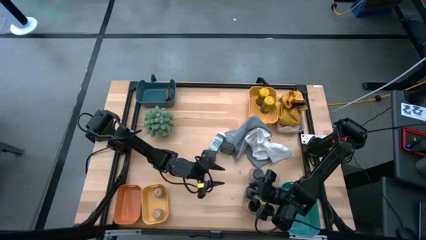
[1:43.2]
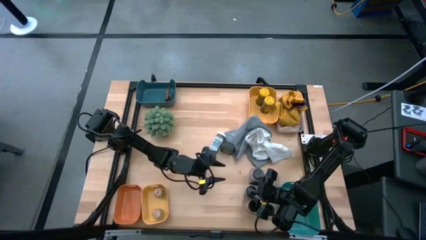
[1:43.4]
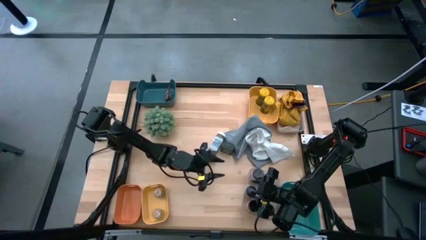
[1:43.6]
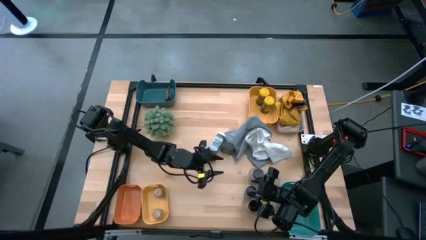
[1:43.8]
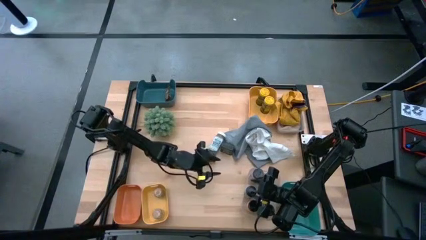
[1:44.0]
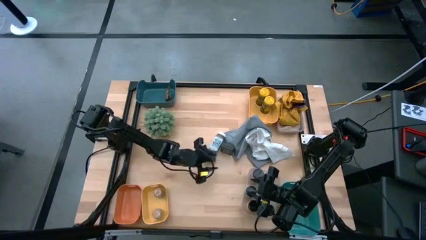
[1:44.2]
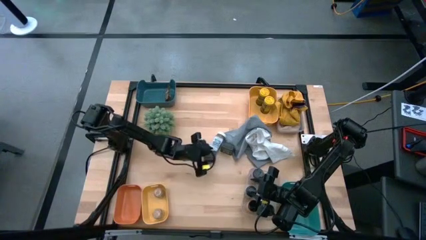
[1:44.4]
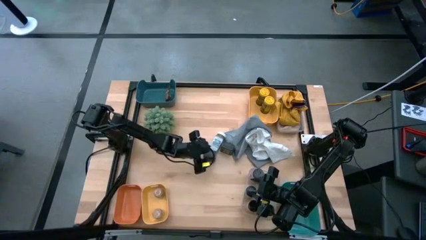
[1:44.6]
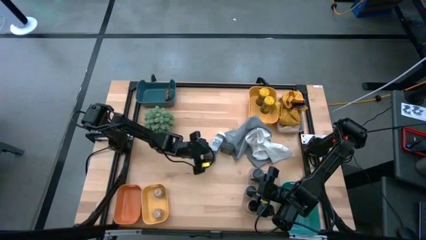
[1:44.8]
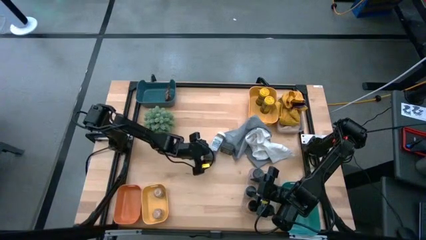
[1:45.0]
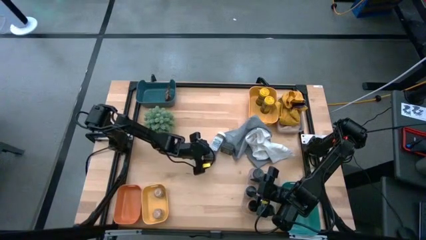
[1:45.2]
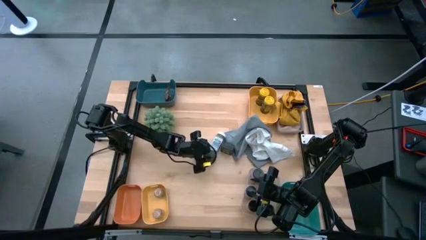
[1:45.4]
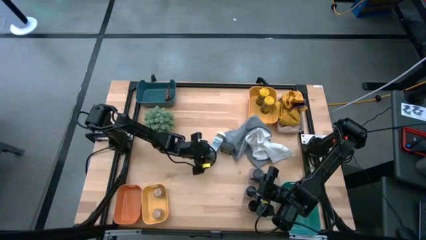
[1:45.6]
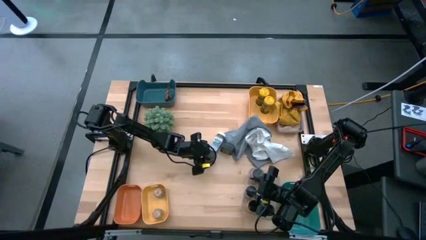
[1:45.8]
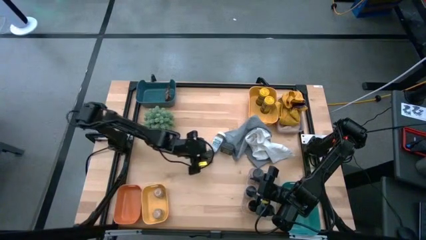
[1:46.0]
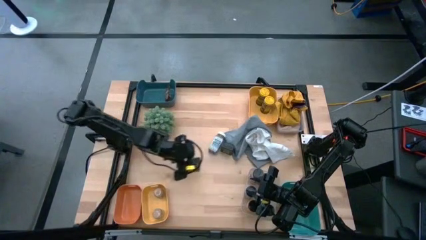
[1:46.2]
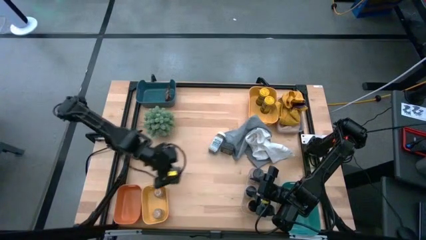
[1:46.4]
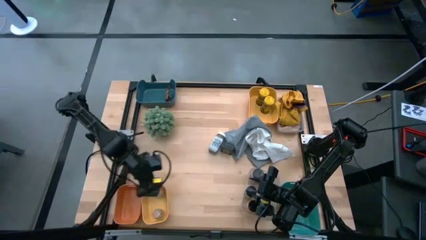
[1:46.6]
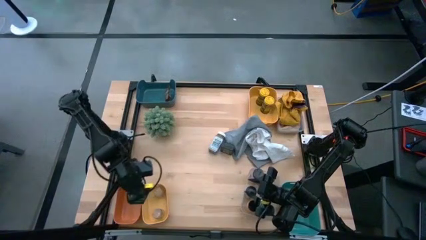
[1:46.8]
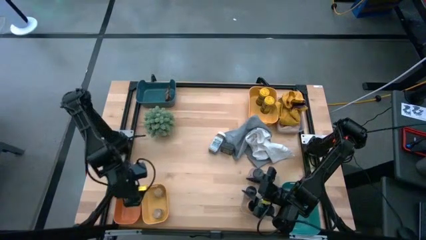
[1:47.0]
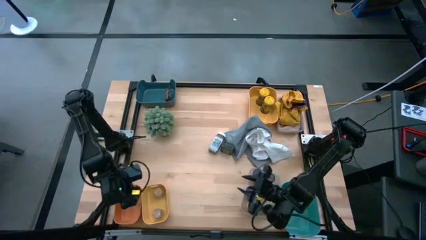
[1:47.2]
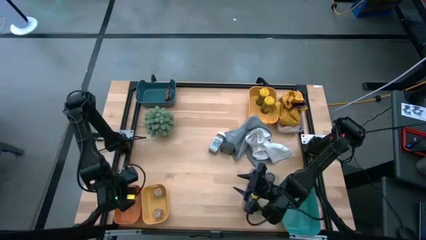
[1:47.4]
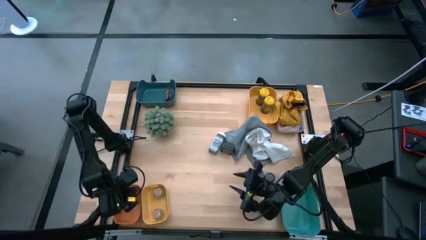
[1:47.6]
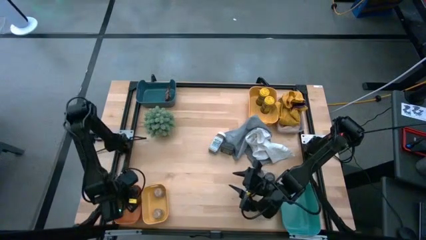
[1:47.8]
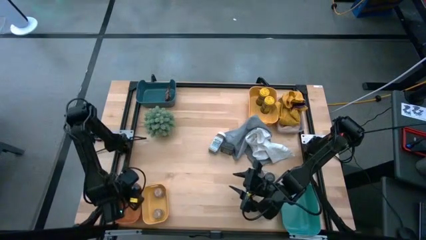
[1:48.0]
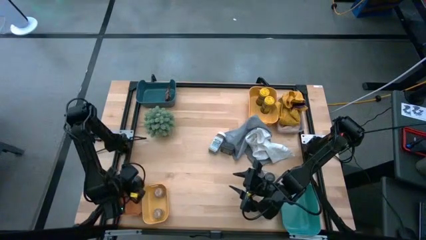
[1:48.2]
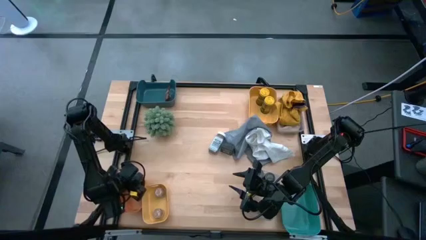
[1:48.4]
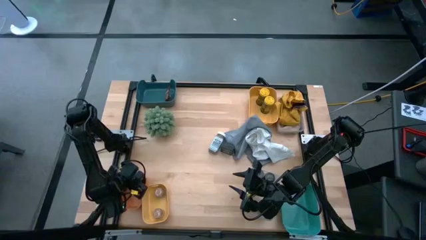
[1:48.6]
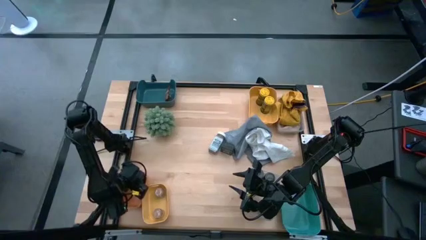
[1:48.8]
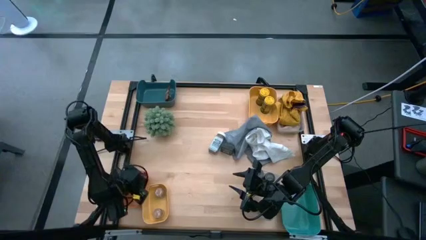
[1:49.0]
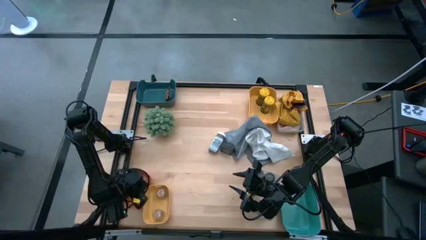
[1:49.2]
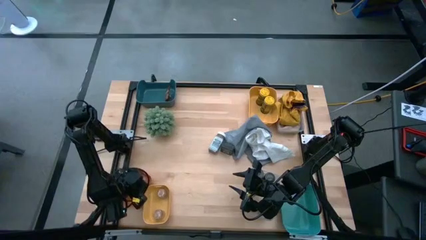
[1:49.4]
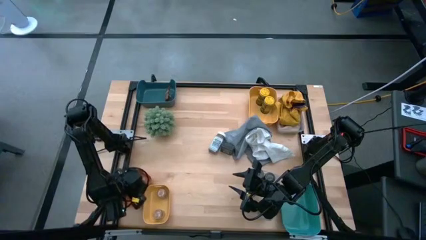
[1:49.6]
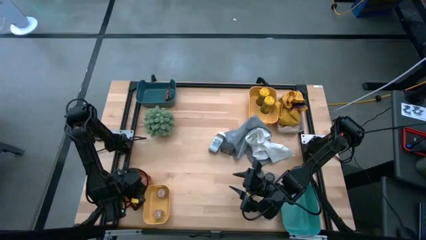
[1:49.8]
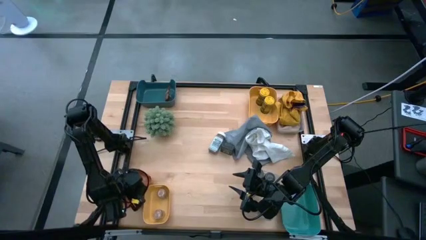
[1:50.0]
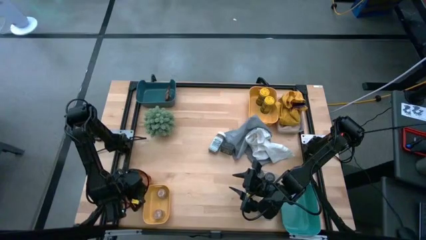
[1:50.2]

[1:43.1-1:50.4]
Task: Sort spices by type
Put the black seasoning can into the orange bin

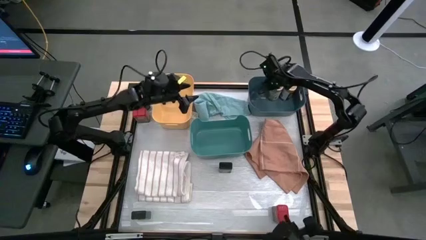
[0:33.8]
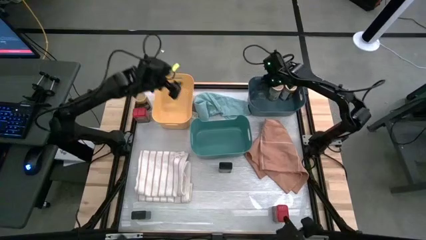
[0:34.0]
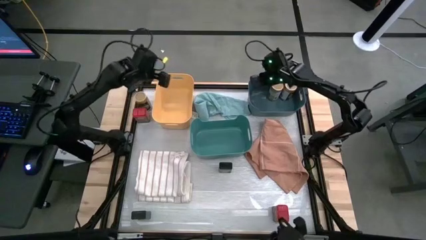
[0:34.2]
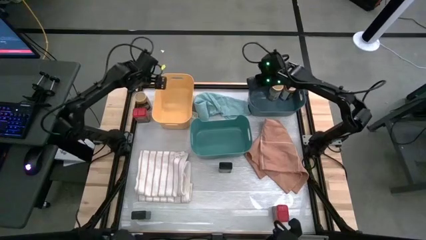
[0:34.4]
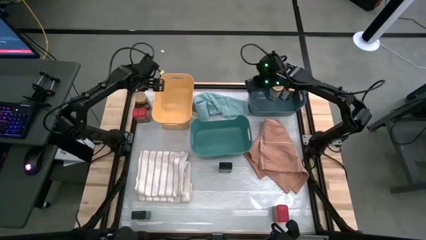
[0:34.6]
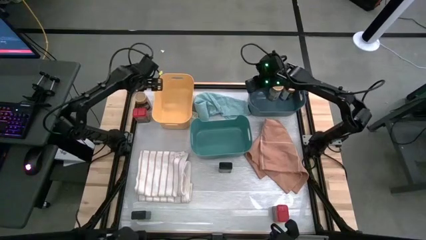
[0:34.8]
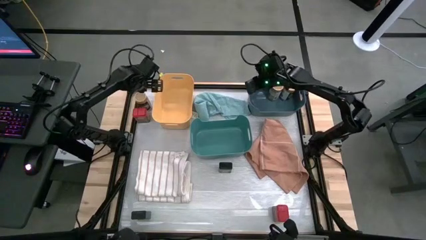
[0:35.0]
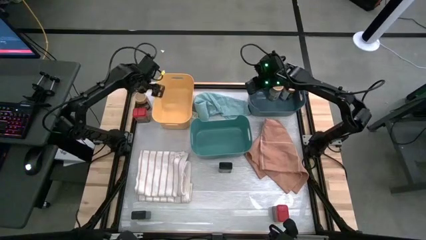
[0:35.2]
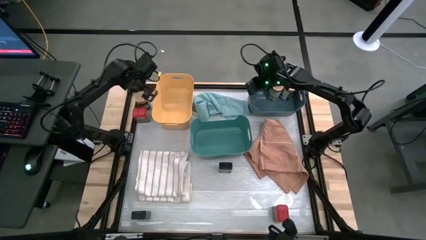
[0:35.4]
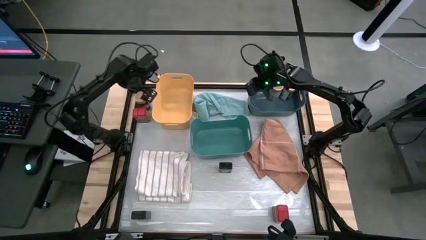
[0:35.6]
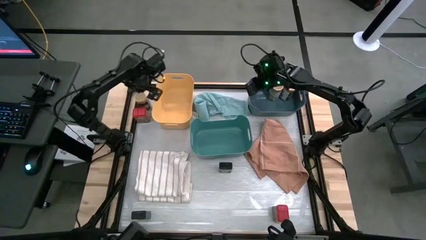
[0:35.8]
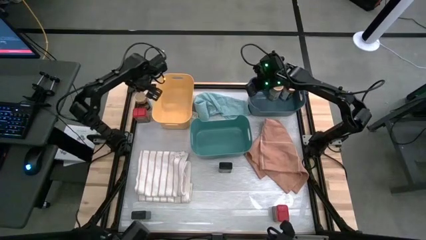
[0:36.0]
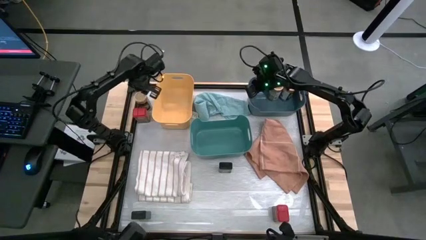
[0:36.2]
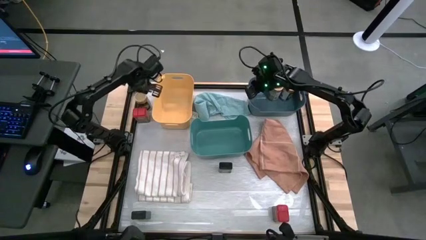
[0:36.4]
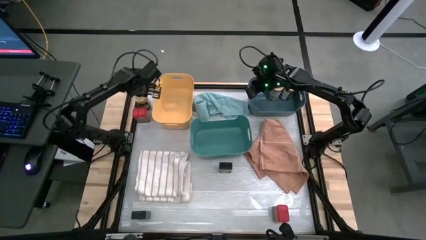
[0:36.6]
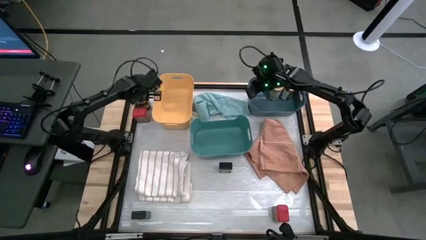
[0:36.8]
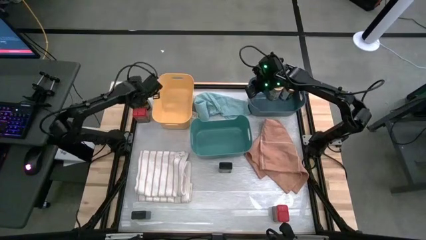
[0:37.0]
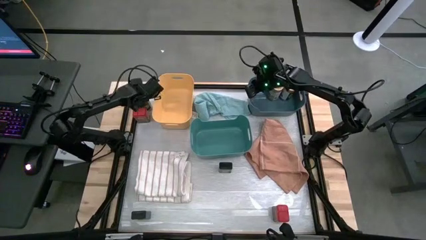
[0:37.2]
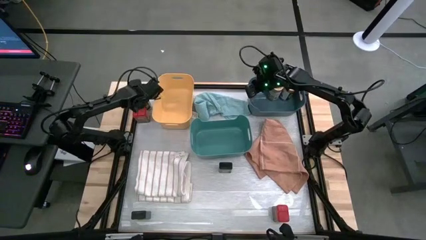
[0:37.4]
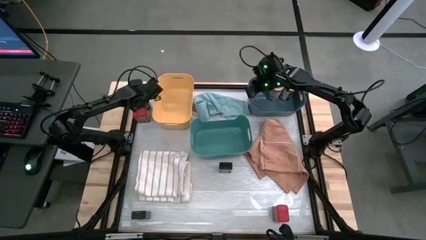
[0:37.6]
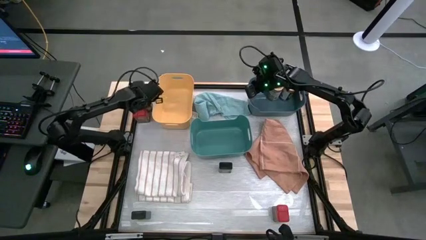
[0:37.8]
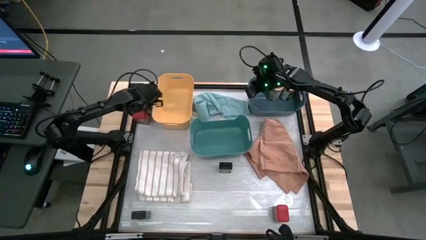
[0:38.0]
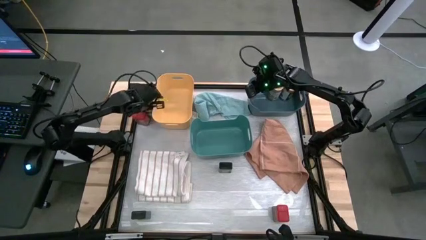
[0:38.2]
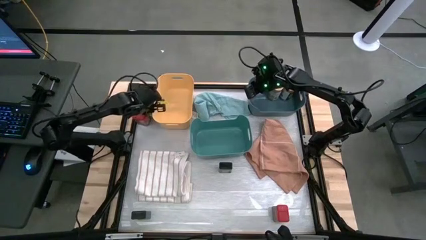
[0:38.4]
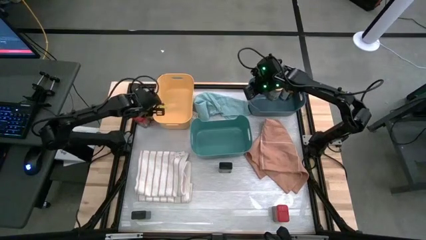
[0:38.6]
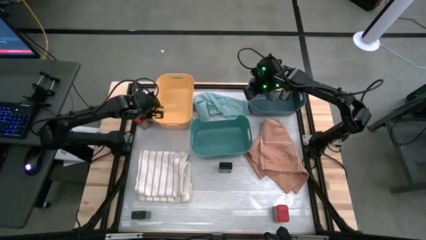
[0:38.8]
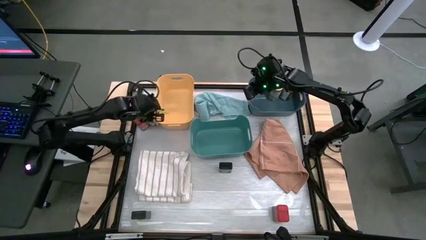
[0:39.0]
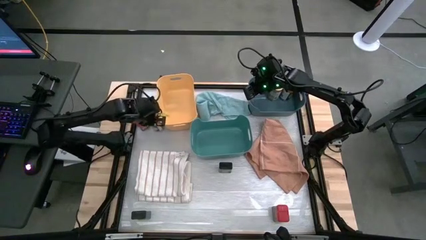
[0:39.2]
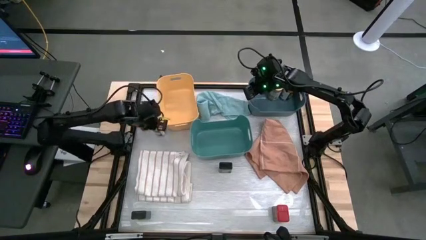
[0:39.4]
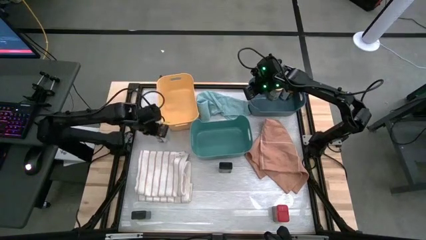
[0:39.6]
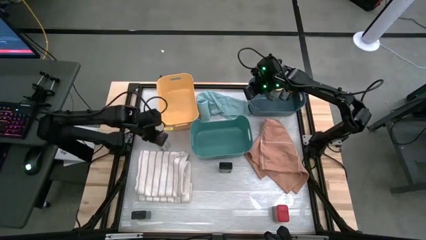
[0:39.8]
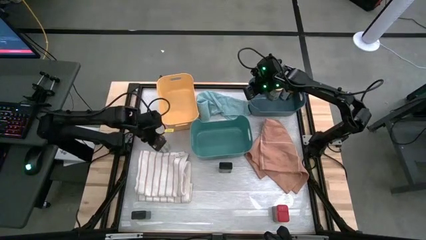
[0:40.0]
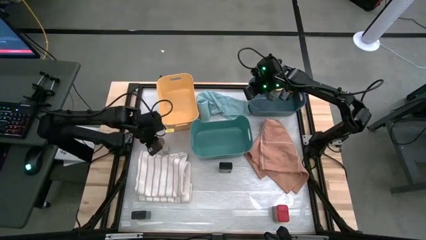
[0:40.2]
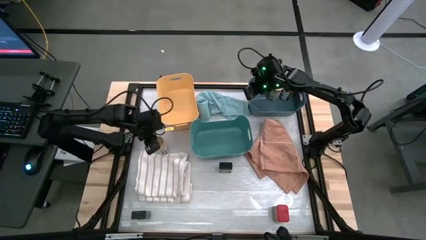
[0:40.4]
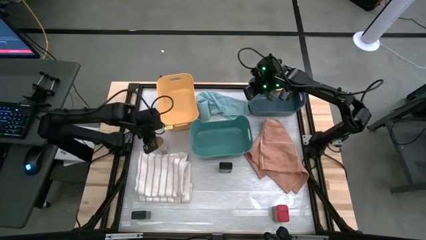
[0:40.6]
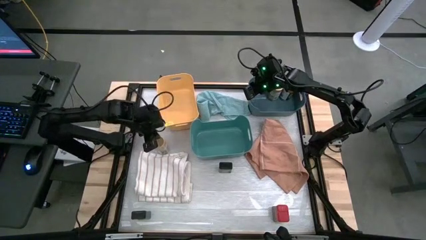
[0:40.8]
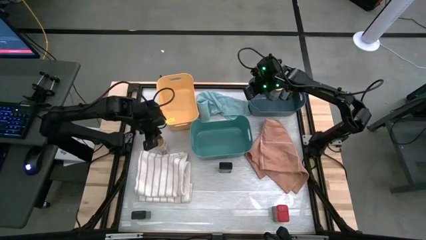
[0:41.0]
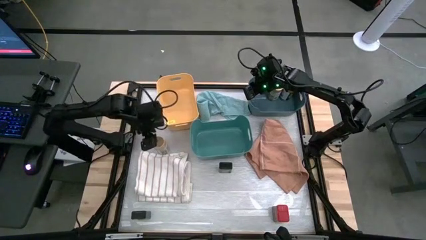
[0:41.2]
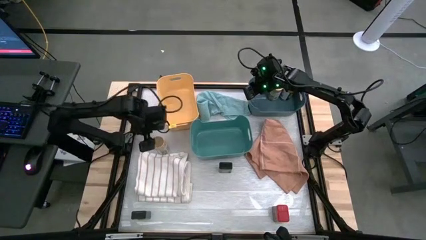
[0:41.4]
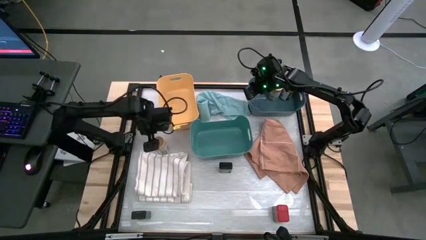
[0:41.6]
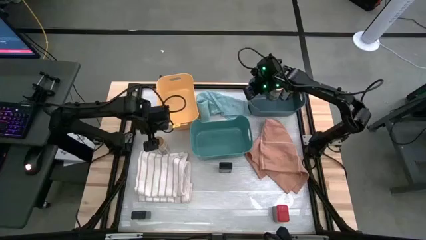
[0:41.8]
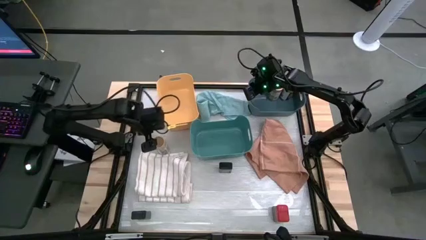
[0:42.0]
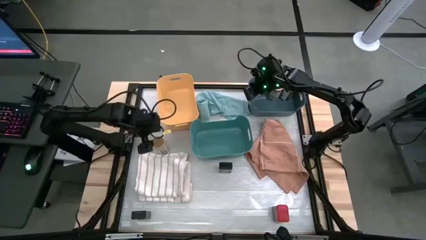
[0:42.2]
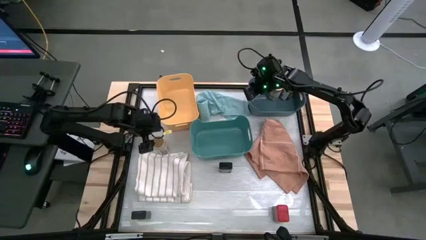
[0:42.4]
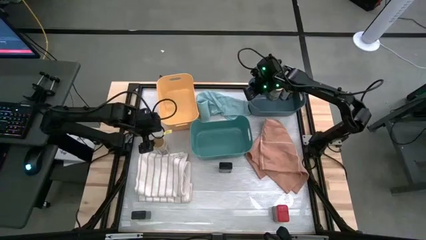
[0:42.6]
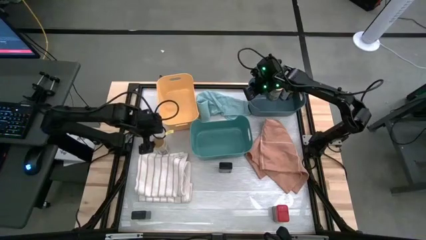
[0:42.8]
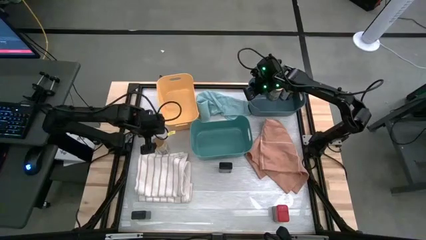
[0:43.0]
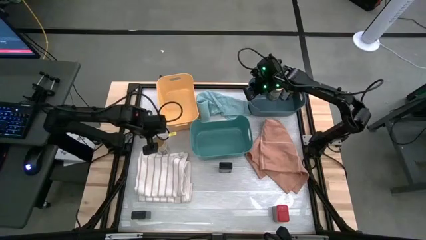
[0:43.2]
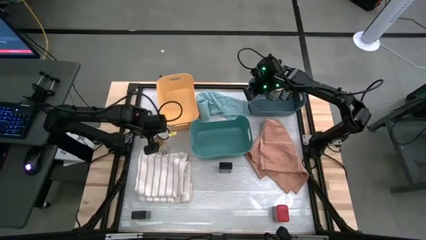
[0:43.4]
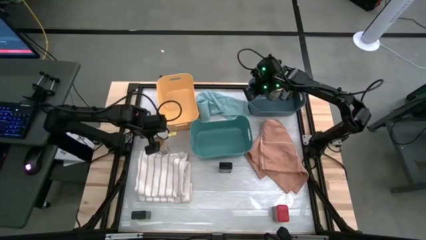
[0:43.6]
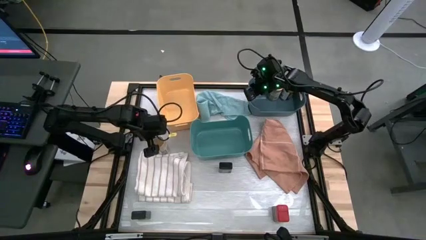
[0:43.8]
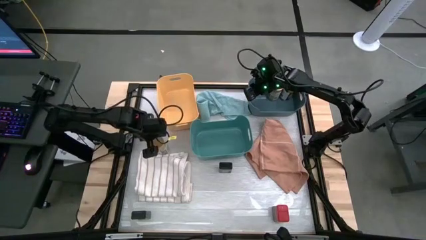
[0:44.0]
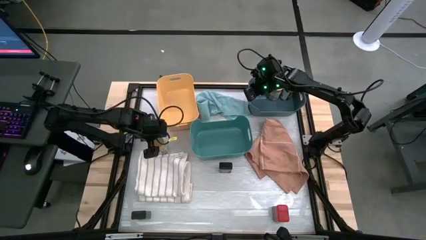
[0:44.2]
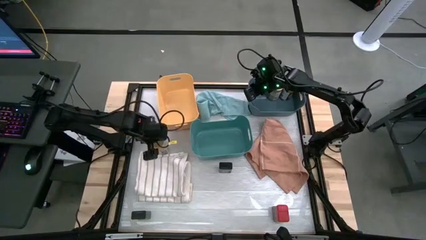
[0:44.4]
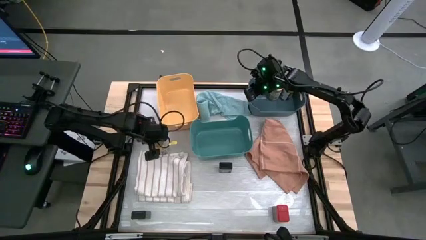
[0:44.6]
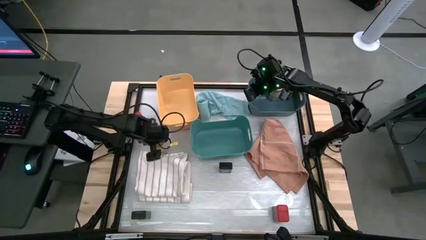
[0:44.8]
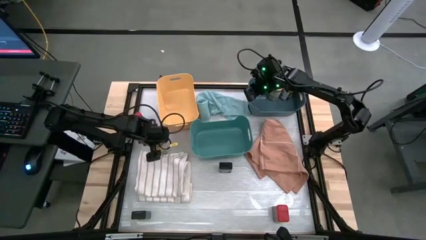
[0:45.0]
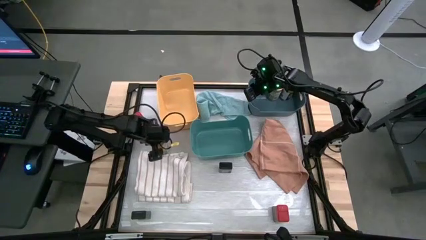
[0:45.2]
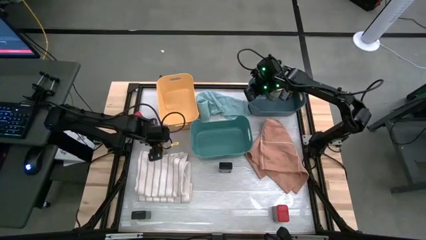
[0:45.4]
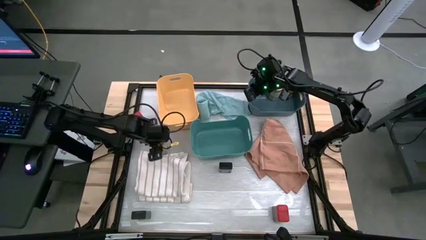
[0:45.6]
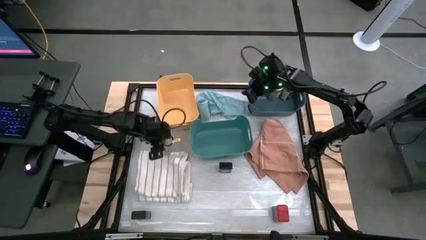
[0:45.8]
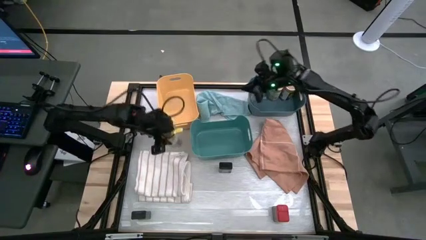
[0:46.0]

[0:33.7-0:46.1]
Task: Sort spices by type
Put the gold seasoning bottle into the blue bin
